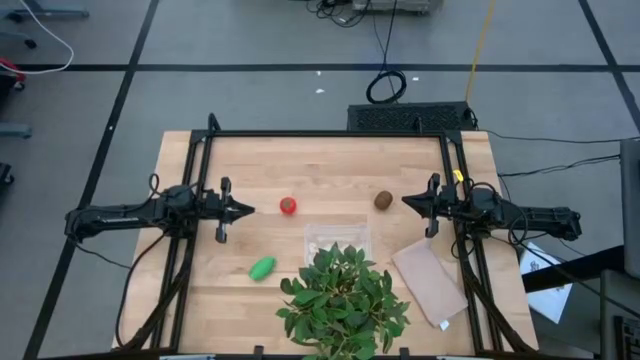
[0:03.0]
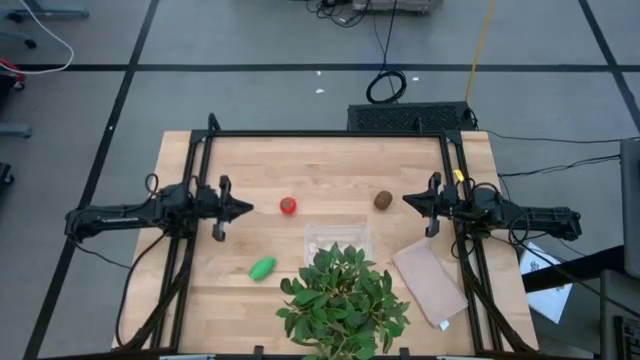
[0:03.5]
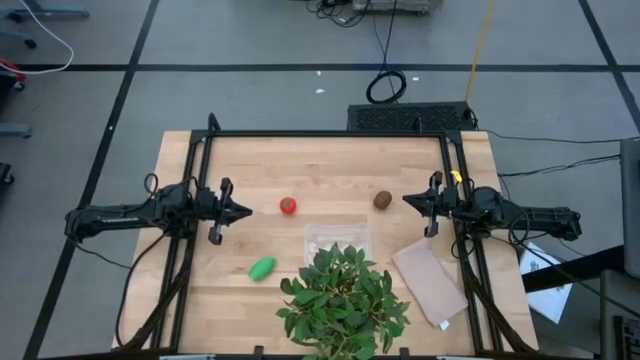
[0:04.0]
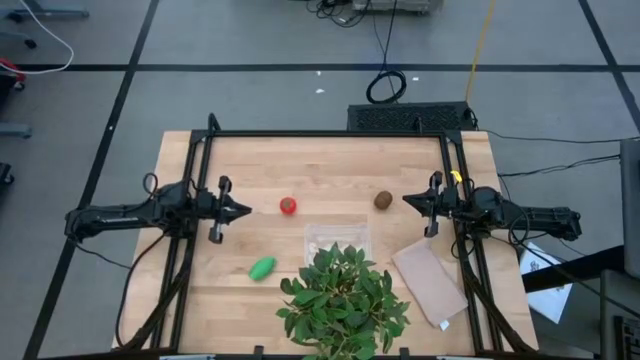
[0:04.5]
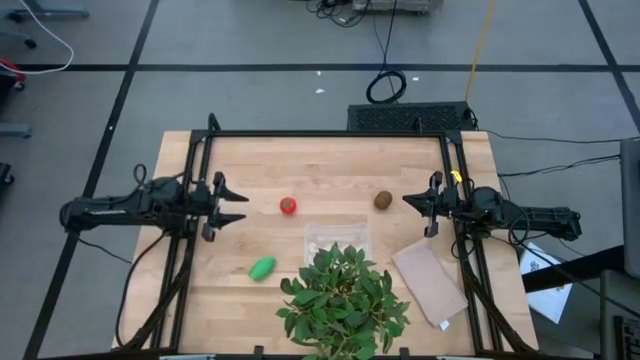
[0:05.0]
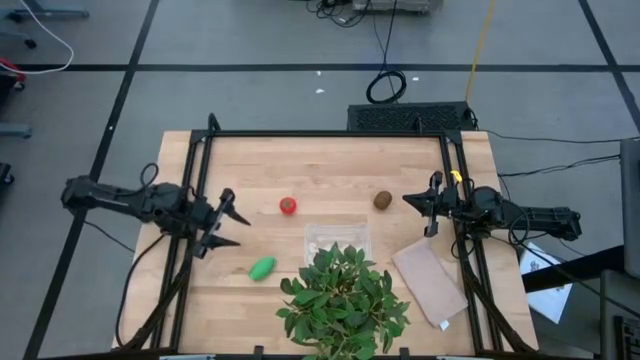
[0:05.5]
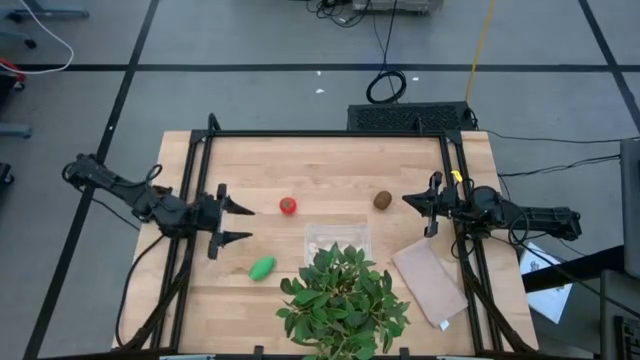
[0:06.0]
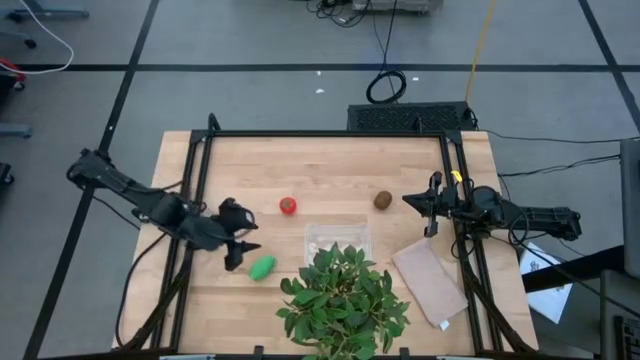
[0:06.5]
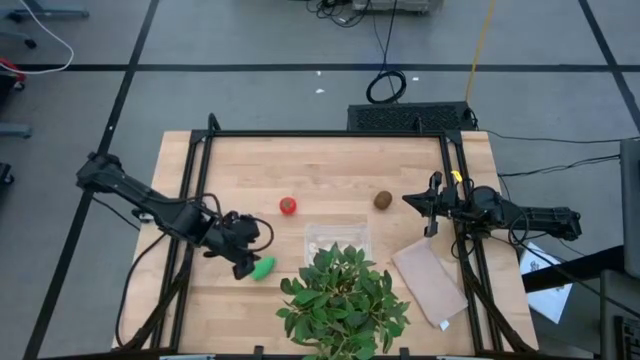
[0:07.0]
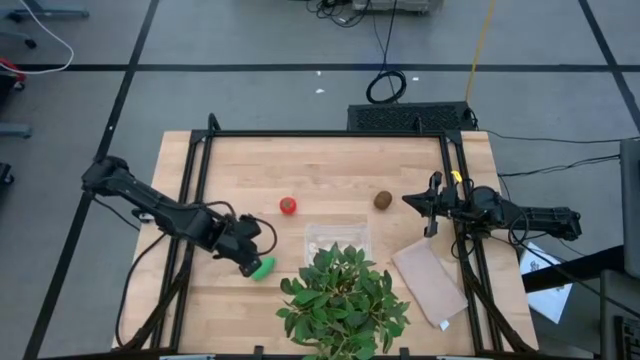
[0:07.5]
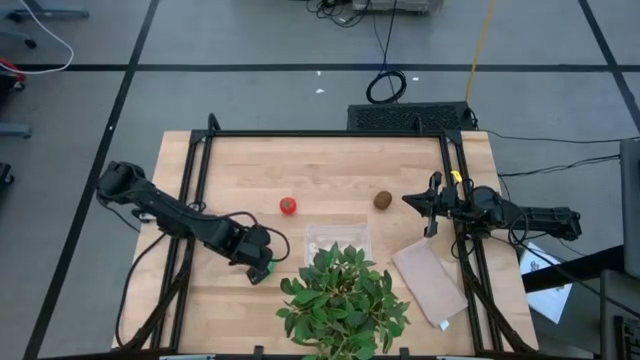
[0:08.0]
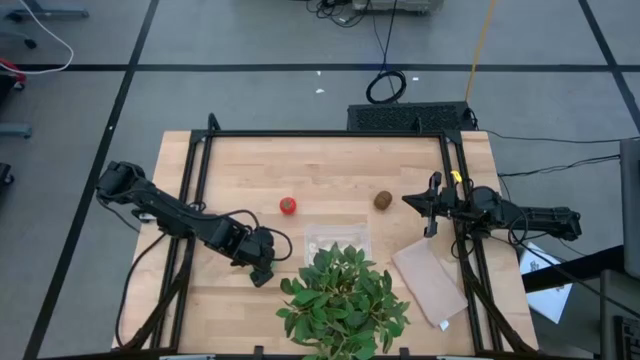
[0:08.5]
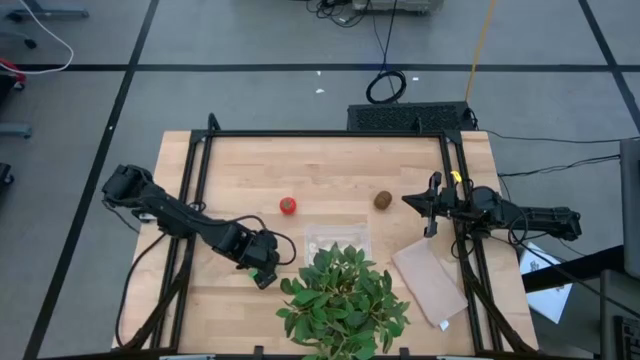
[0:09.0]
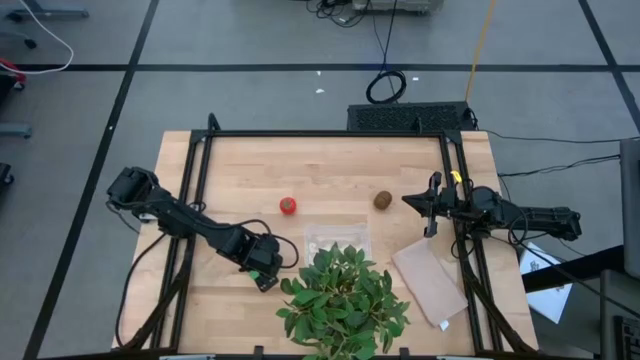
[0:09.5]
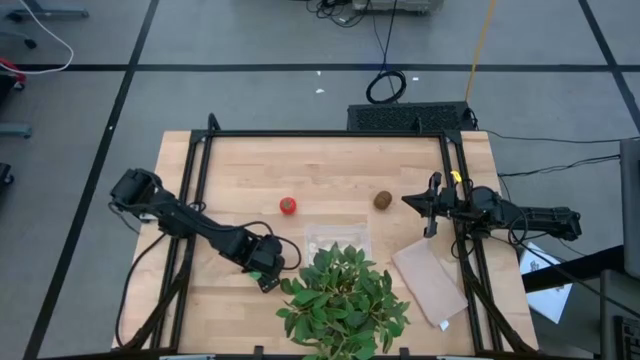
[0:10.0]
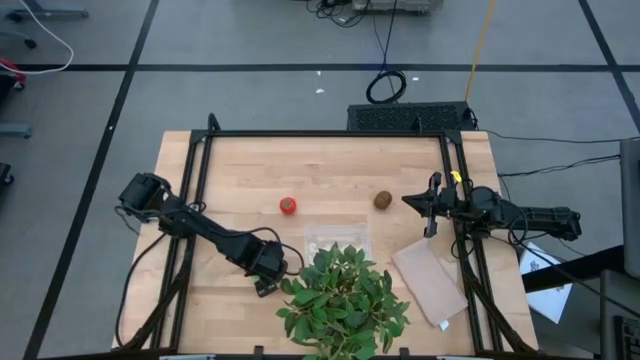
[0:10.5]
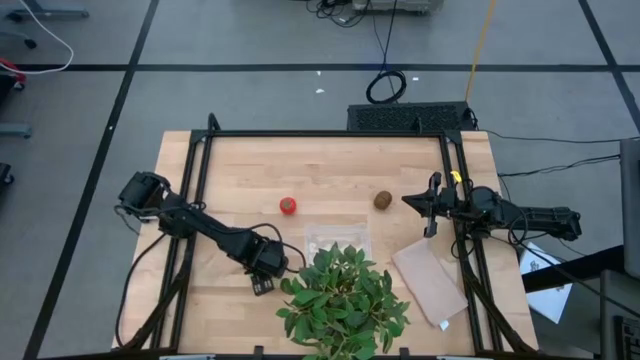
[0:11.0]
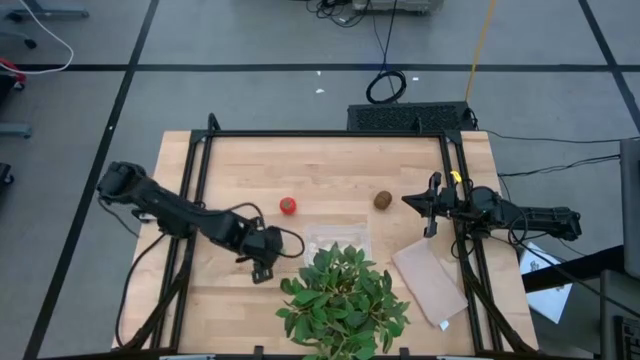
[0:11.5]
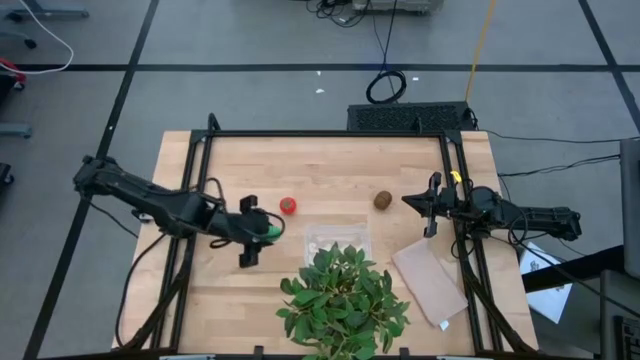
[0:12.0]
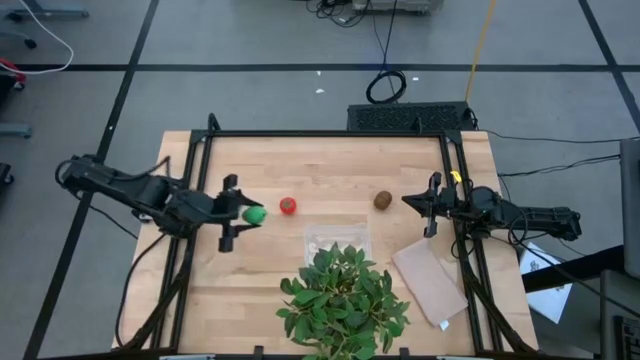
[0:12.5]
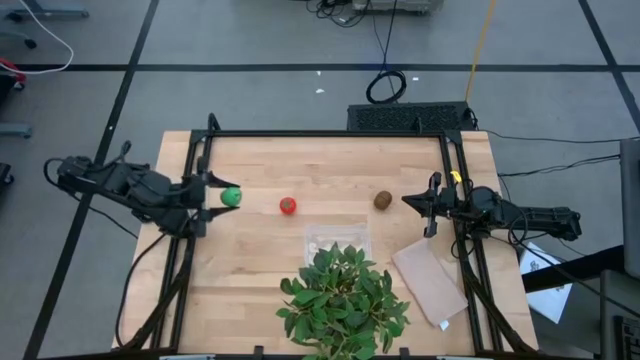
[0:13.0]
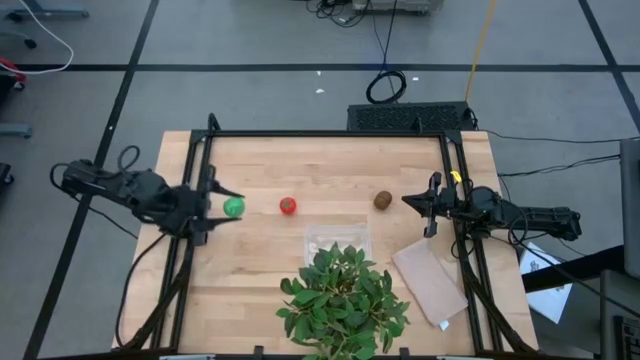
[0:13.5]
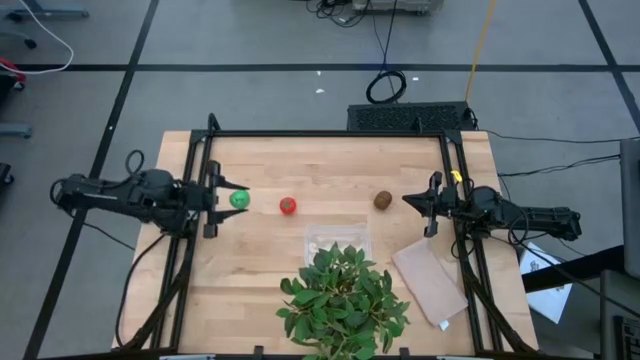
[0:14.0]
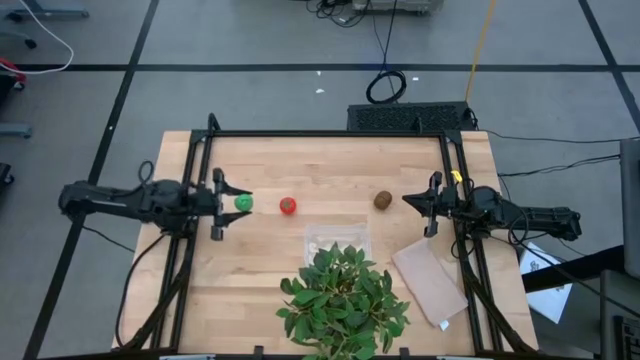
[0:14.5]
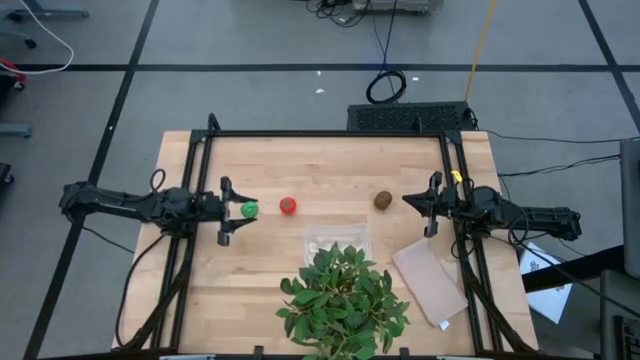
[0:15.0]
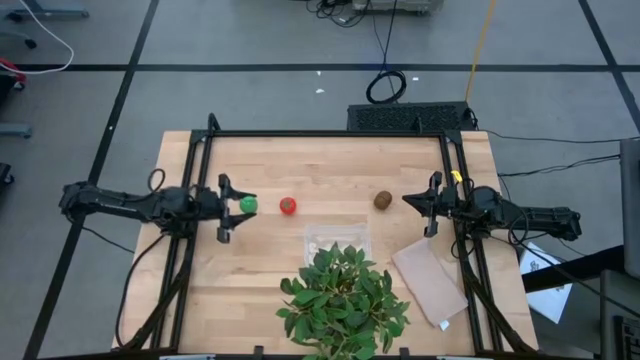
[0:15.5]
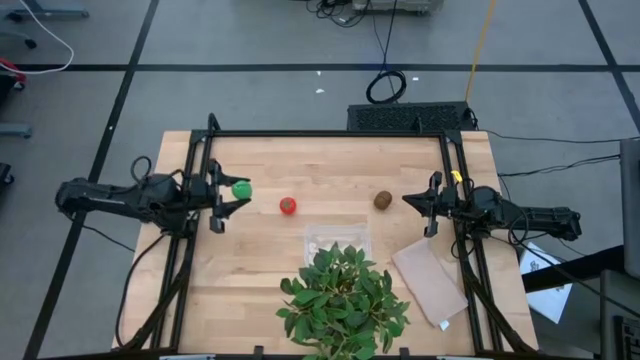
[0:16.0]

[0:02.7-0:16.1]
Task: Pick and placing Produce into tupperware
Put the green corn into the transparent bin

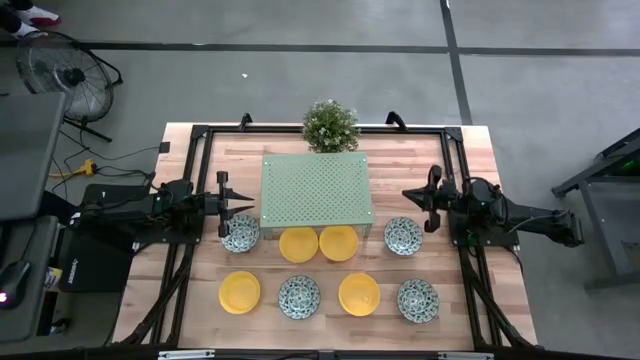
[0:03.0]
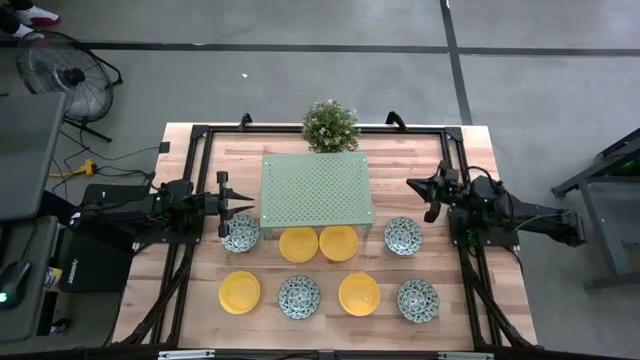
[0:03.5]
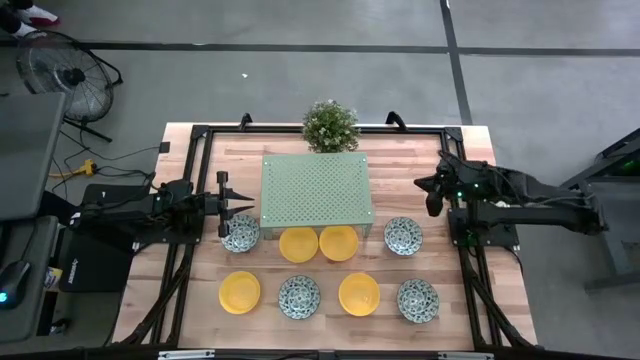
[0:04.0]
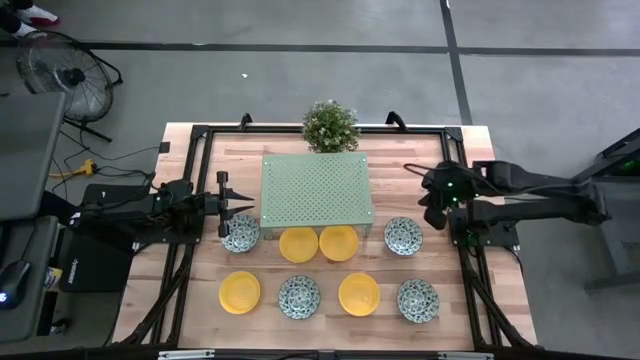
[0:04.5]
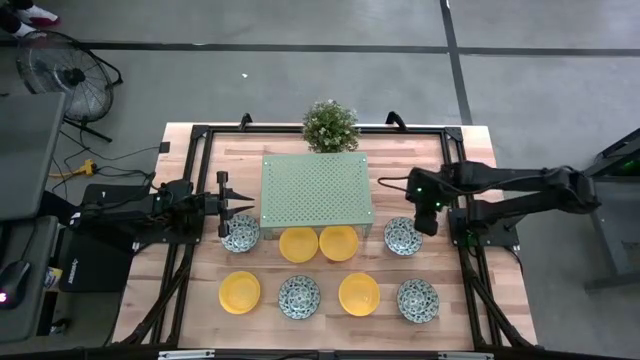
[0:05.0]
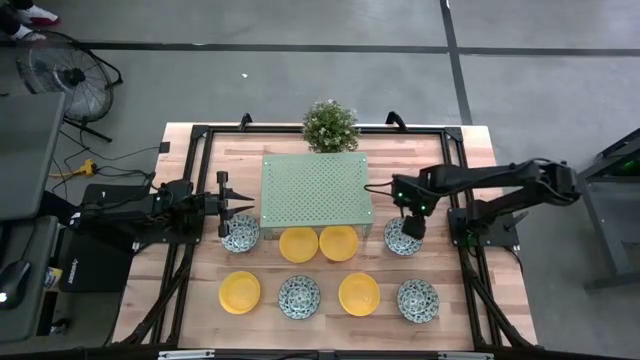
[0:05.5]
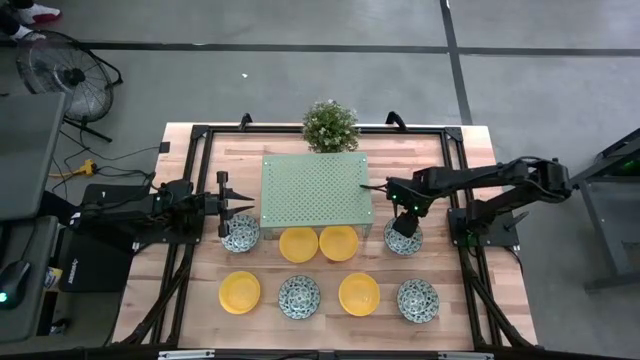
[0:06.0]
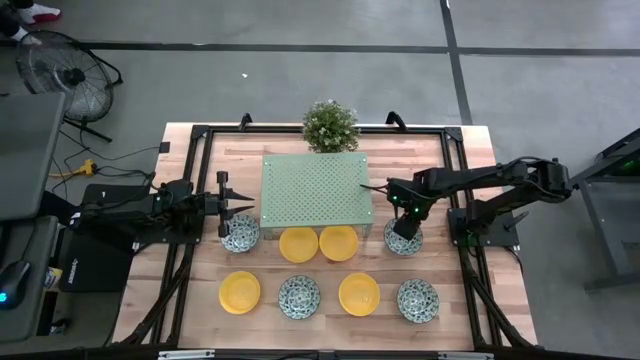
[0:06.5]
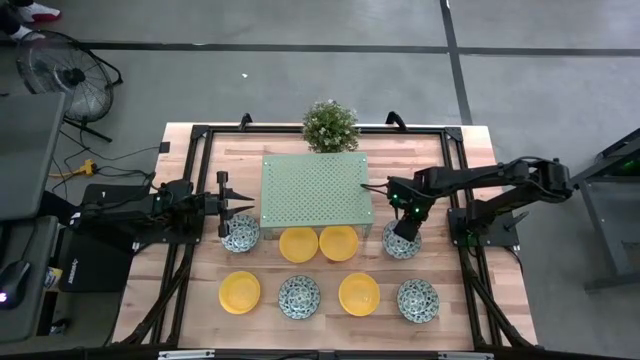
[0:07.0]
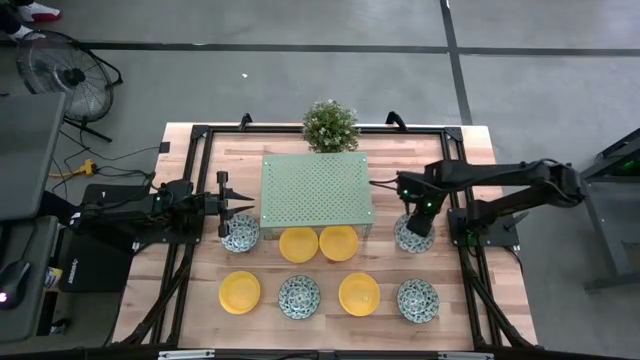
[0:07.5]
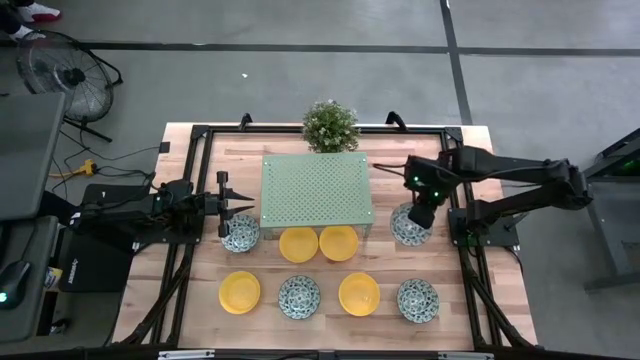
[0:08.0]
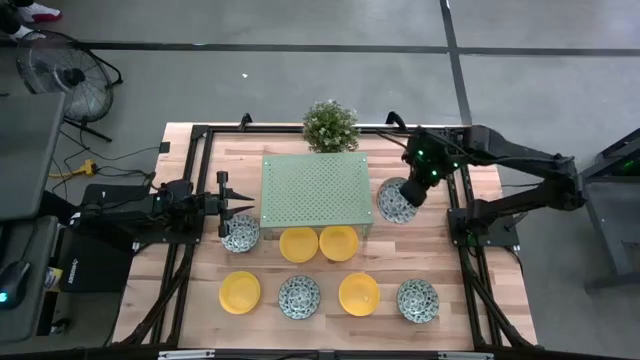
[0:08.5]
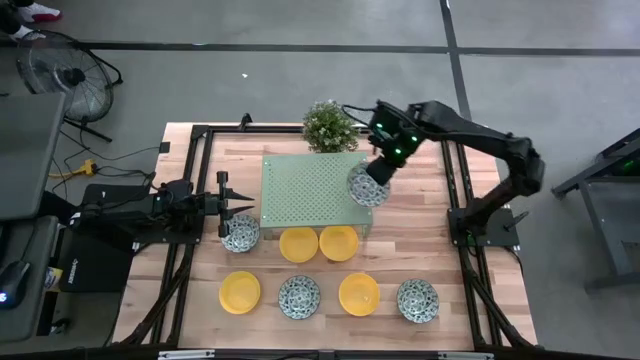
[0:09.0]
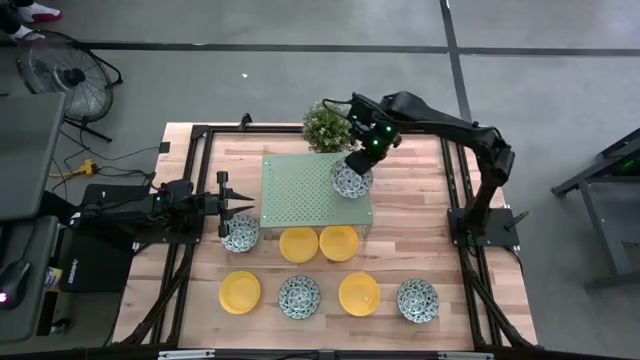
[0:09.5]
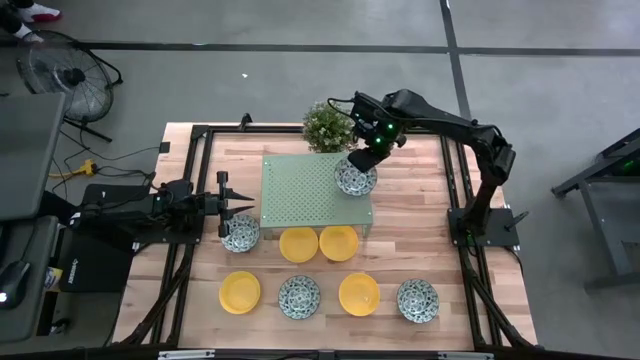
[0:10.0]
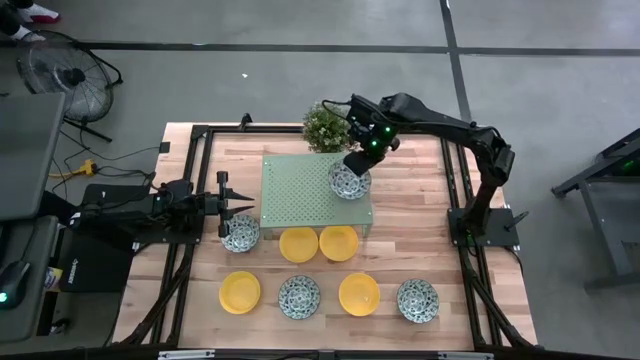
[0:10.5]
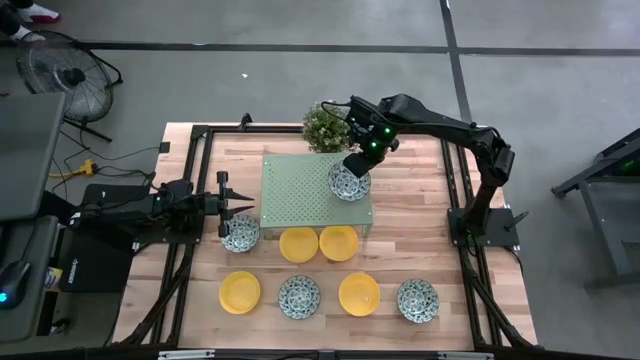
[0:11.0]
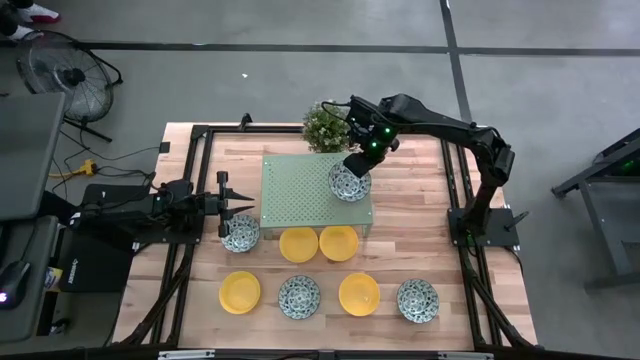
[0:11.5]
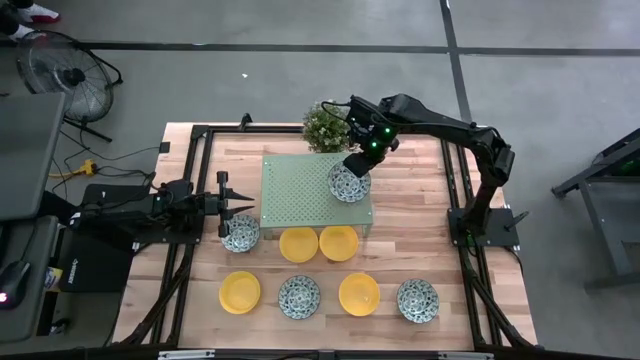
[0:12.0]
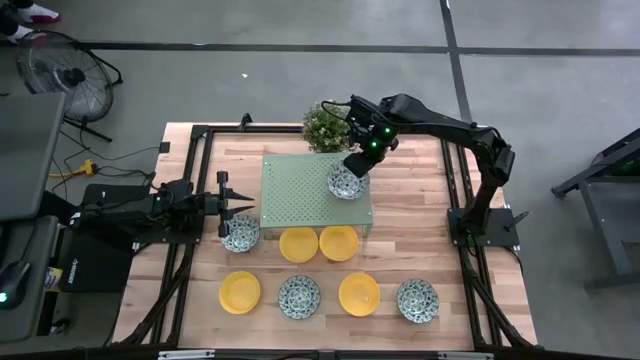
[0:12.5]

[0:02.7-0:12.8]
Task: Pick & Place Mini bowls
Put the blue patterned bowl on the shelf
